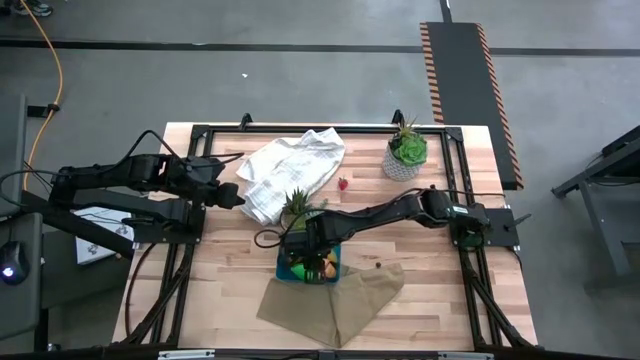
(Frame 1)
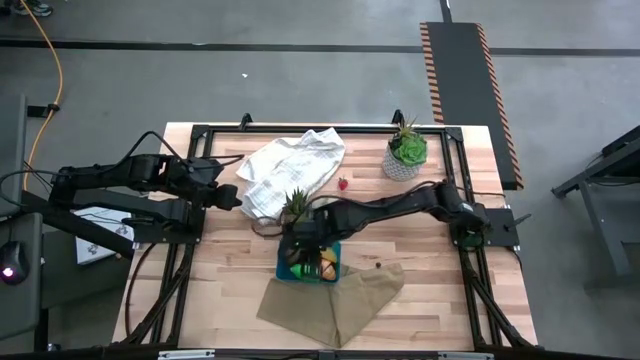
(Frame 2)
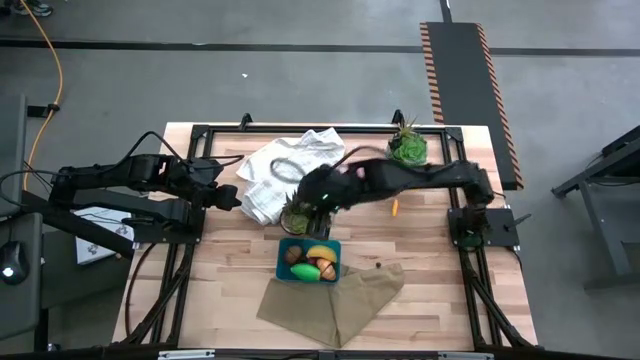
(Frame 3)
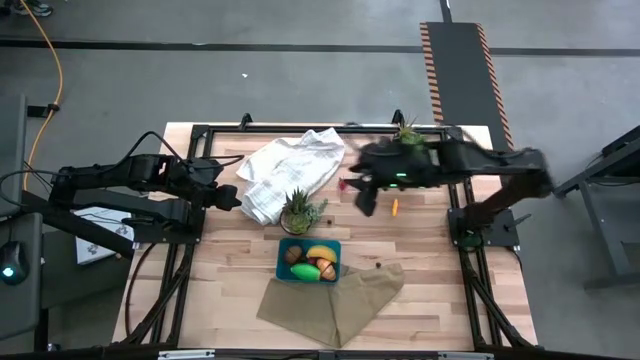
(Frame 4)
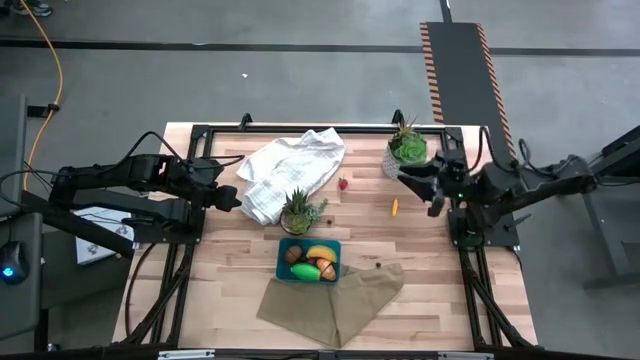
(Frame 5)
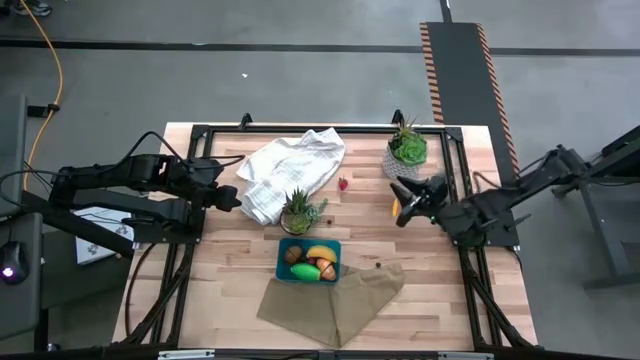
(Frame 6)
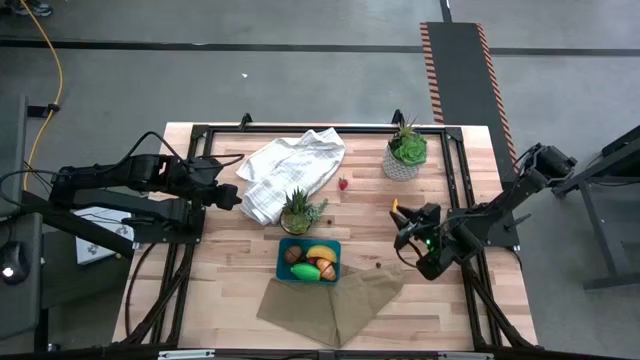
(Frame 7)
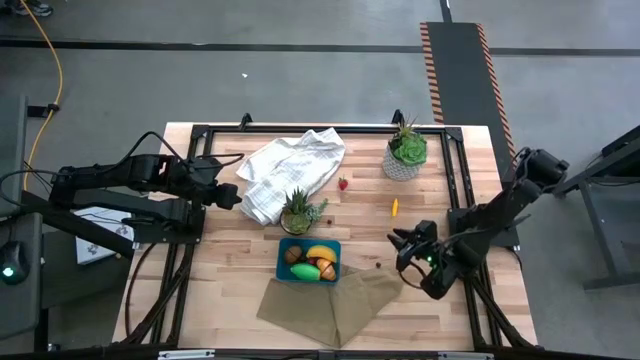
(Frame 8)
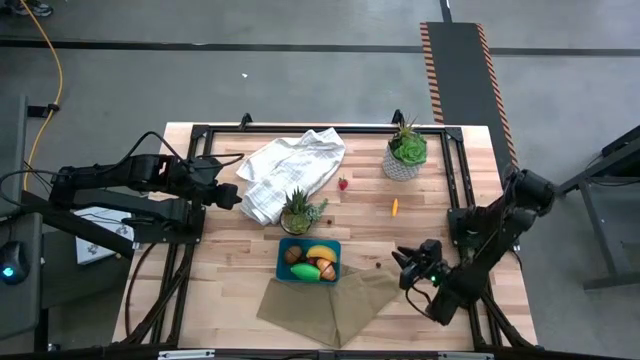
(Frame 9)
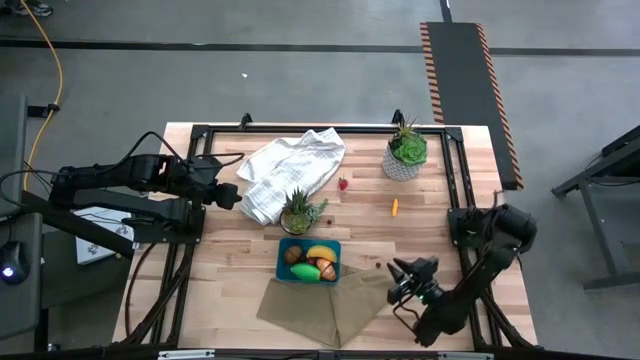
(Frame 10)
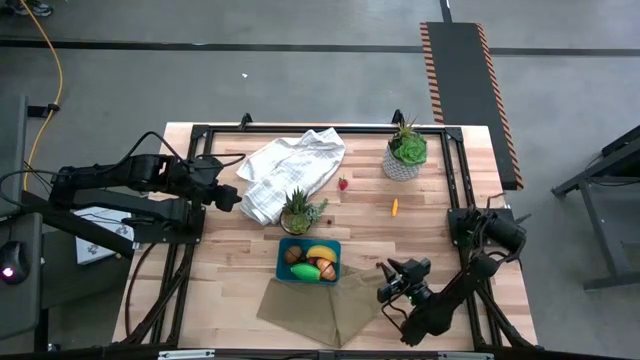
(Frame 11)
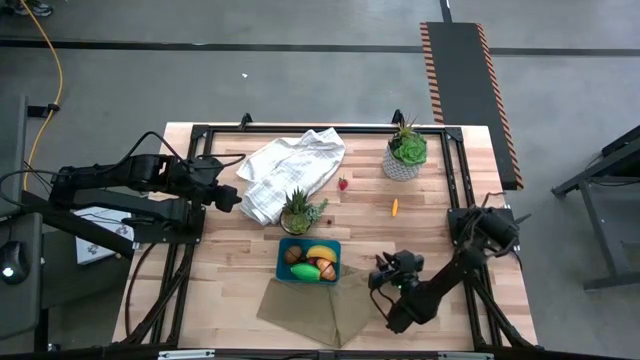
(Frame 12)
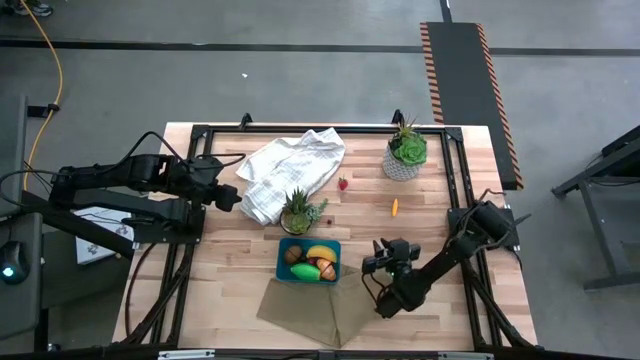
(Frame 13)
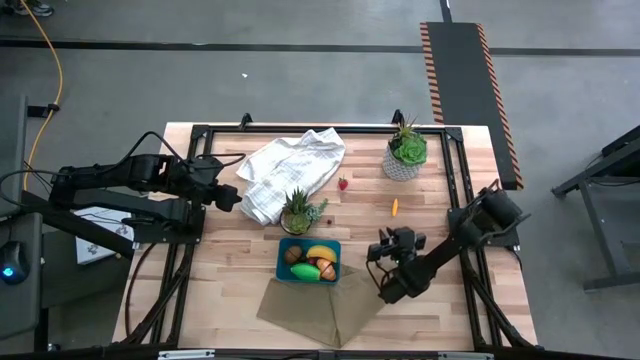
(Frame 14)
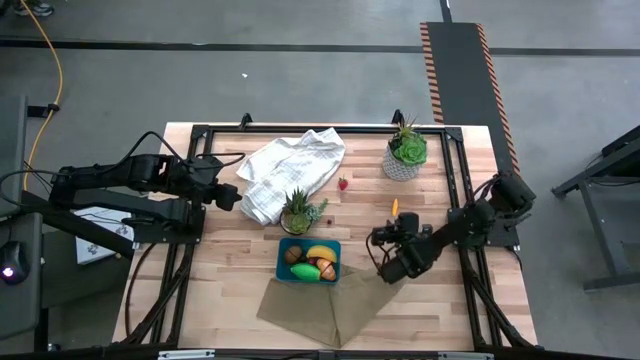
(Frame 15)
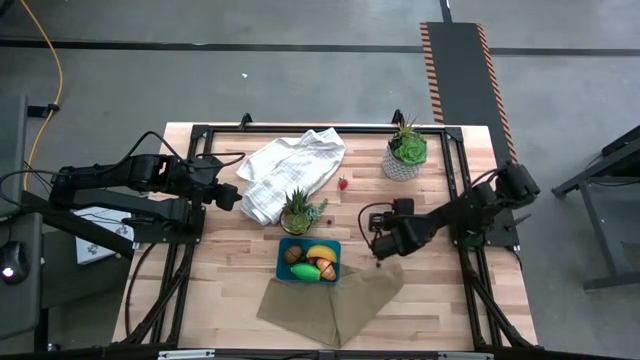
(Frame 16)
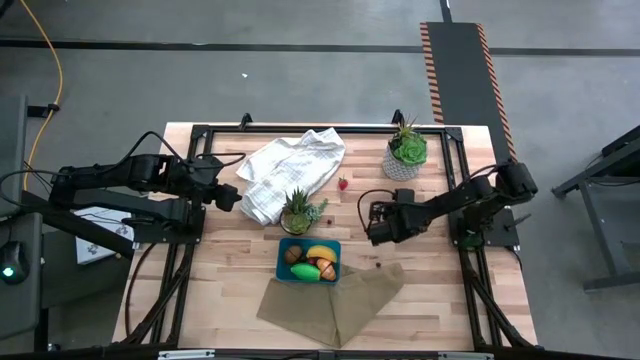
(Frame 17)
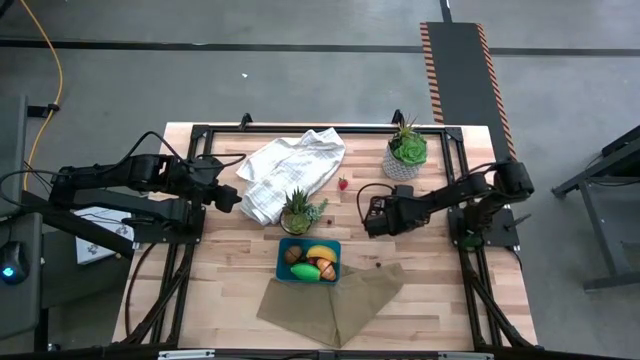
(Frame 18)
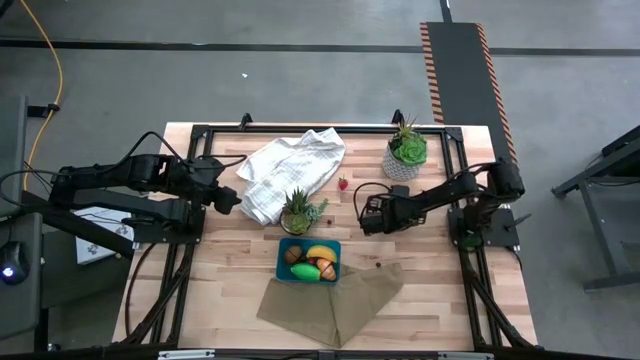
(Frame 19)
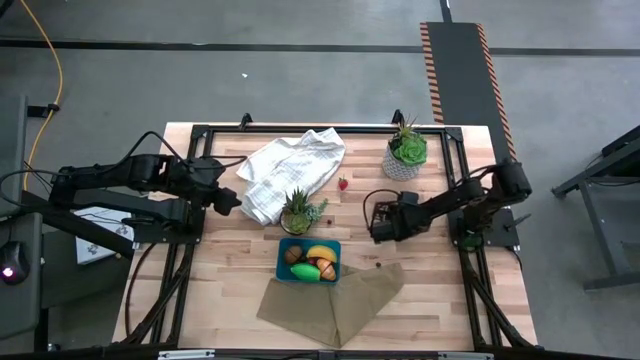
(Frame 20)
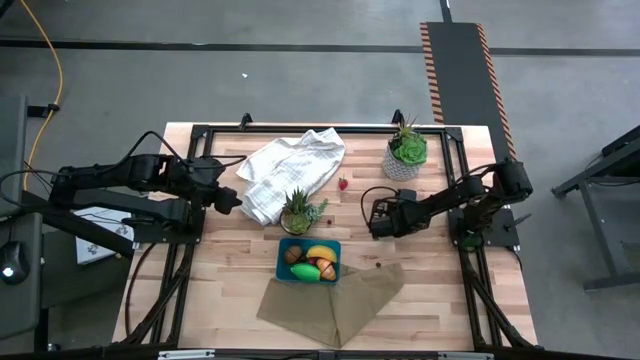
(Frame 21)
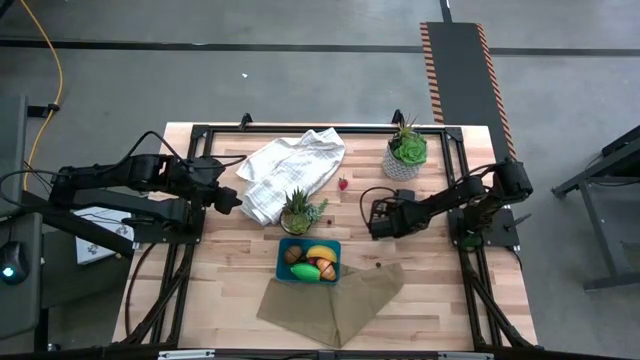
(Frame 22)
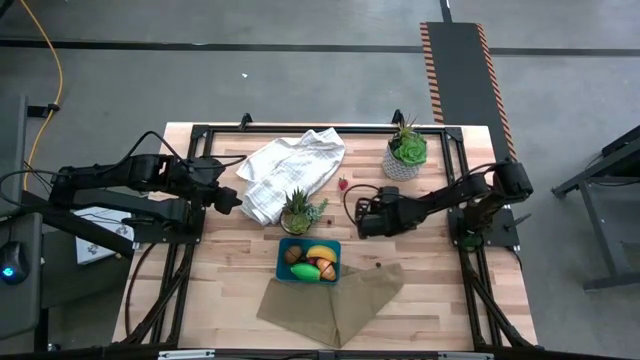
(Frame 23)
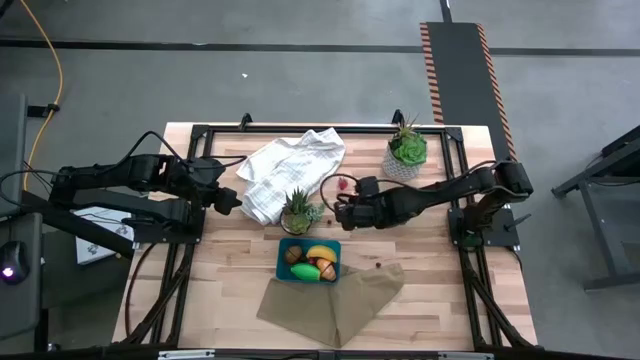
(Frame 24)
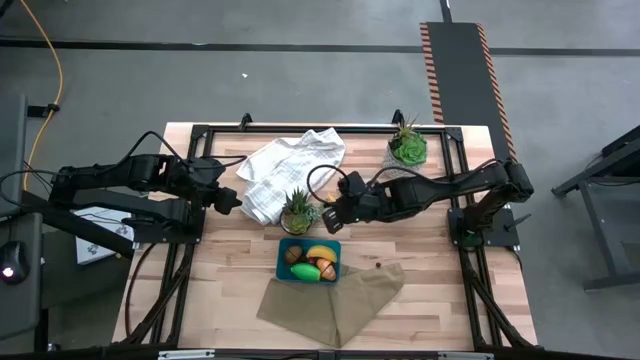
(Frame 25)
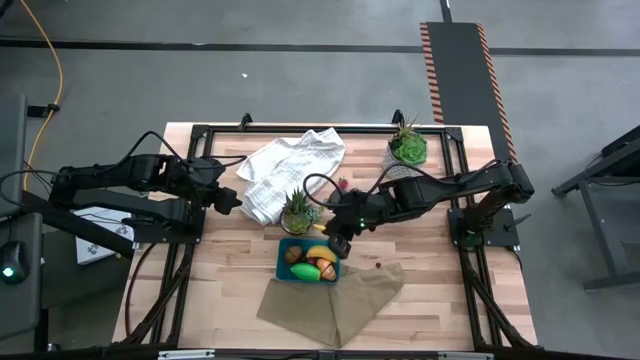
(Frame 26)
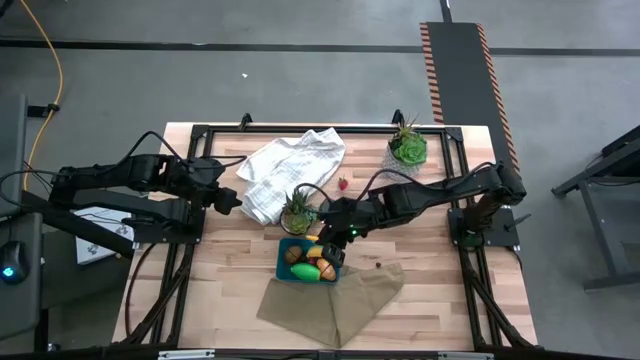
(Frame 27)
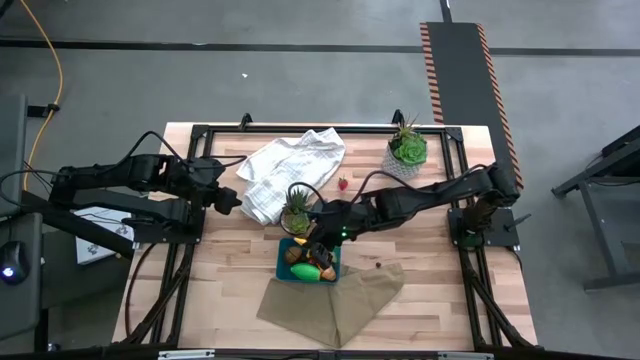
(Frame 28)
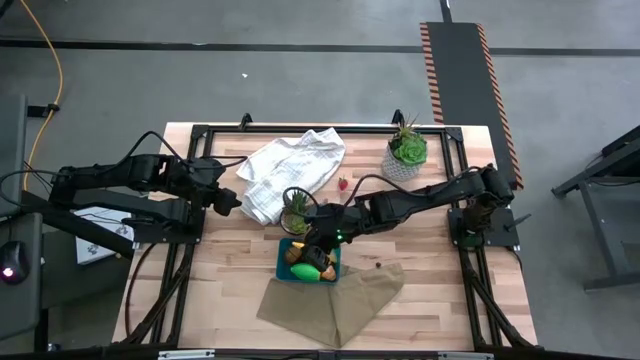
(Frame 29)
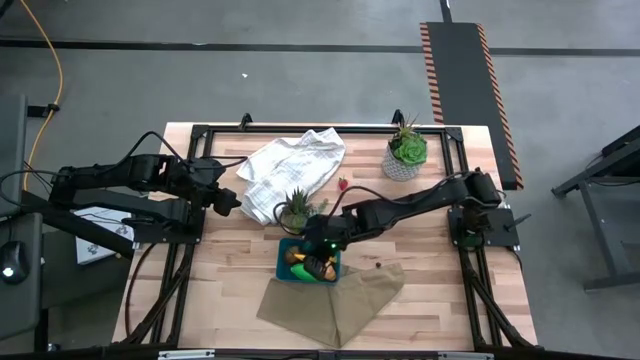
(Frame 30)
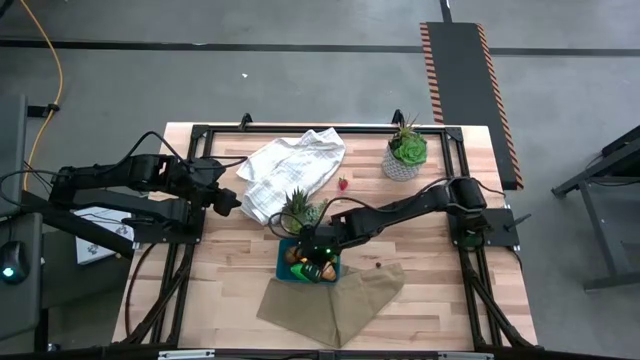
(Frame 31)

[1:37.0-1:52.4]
Task: Pick and placing Produce into tupperware
Put the small corn into the blue bin

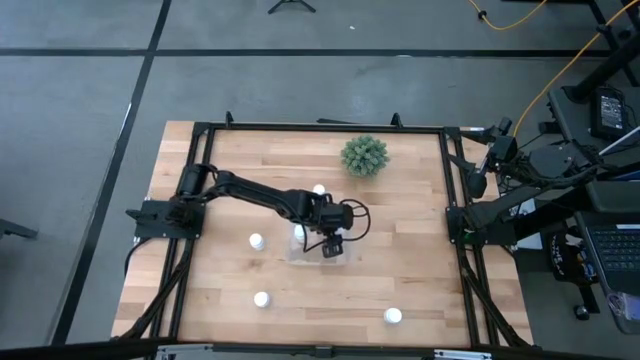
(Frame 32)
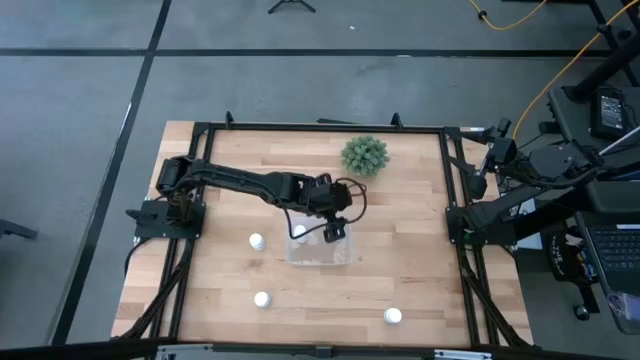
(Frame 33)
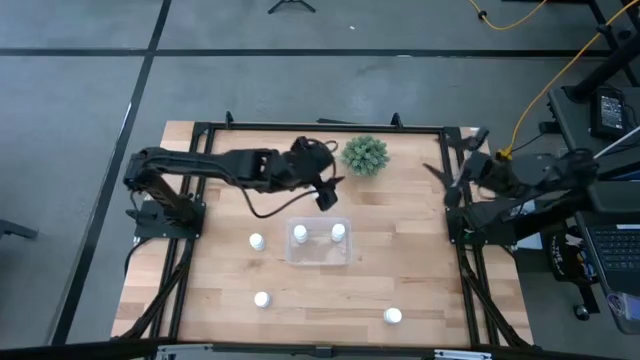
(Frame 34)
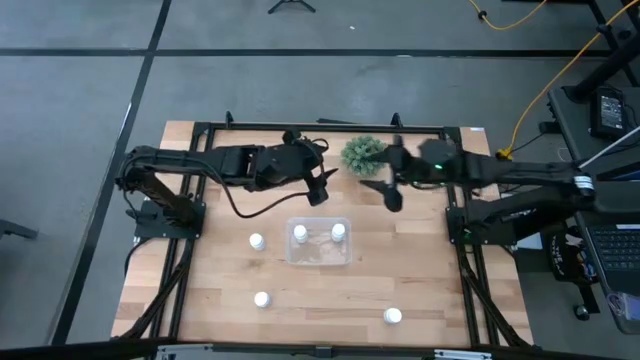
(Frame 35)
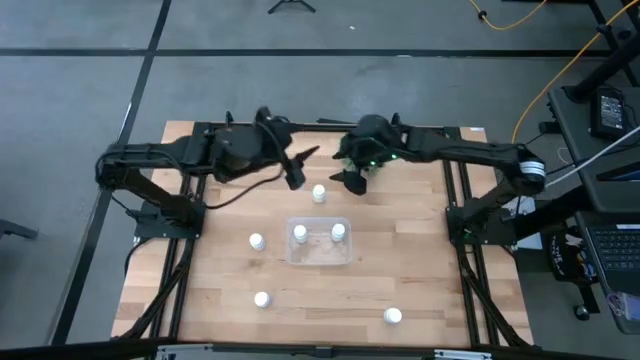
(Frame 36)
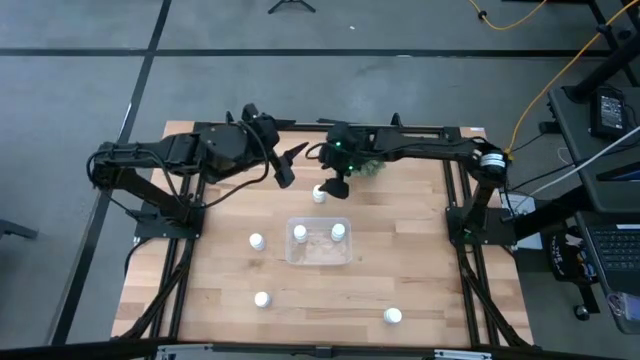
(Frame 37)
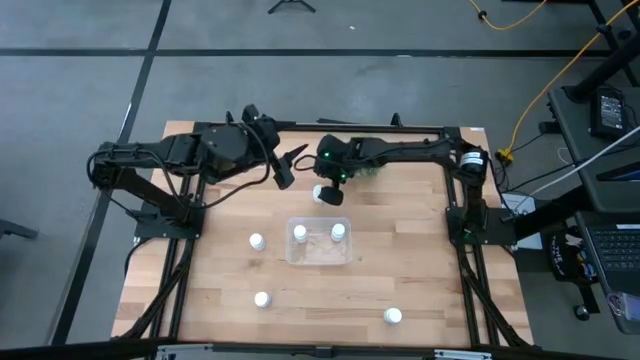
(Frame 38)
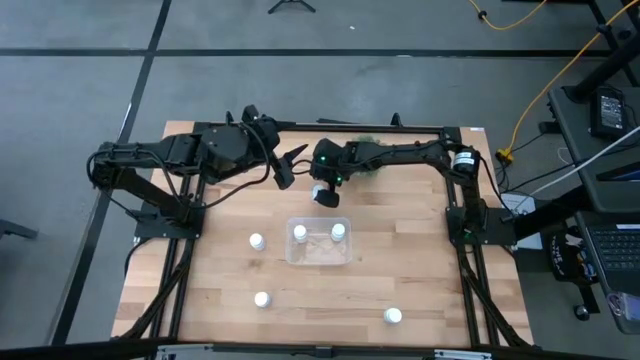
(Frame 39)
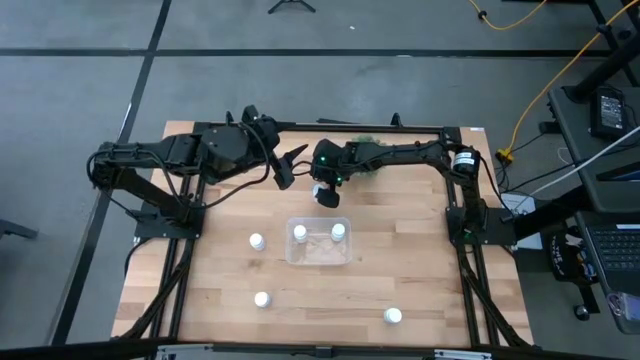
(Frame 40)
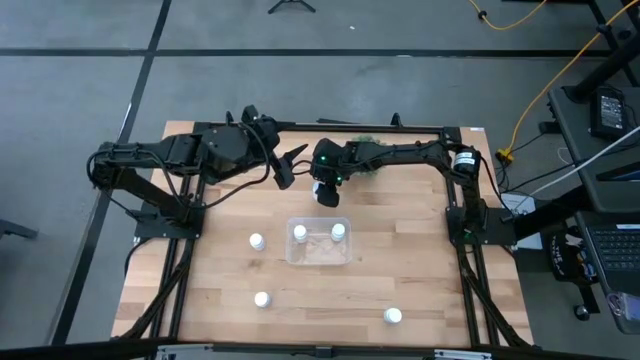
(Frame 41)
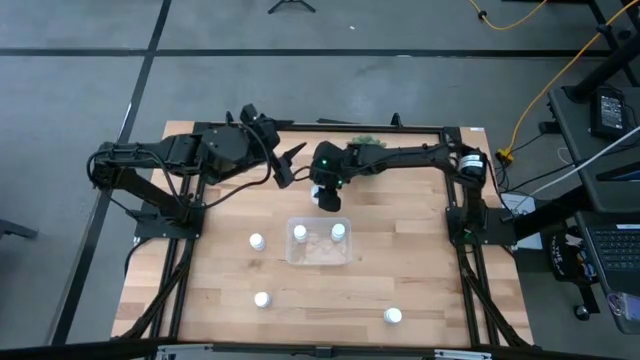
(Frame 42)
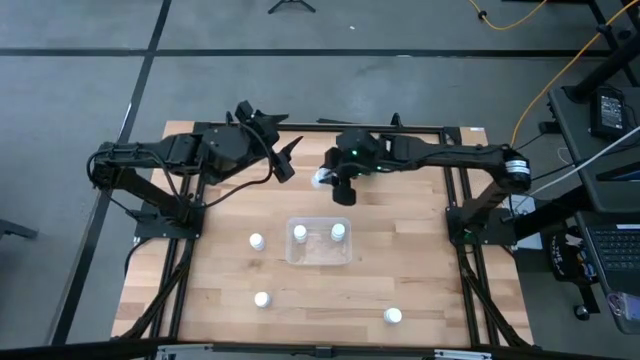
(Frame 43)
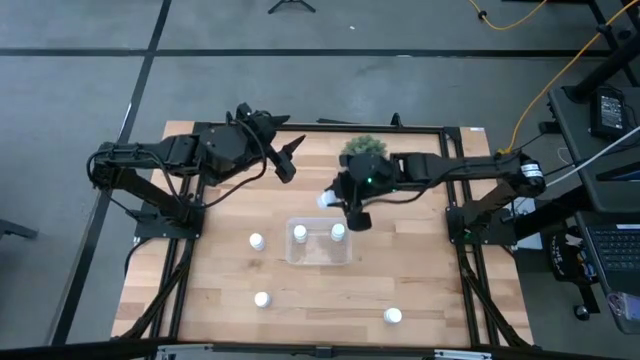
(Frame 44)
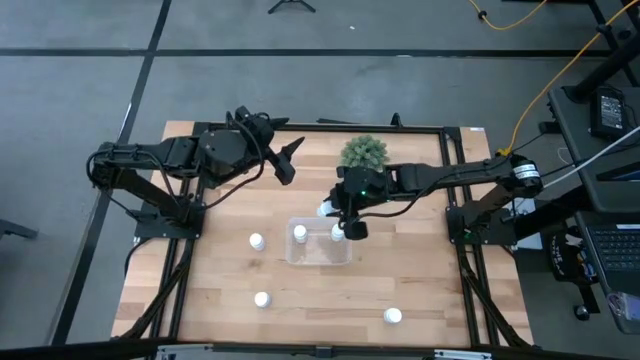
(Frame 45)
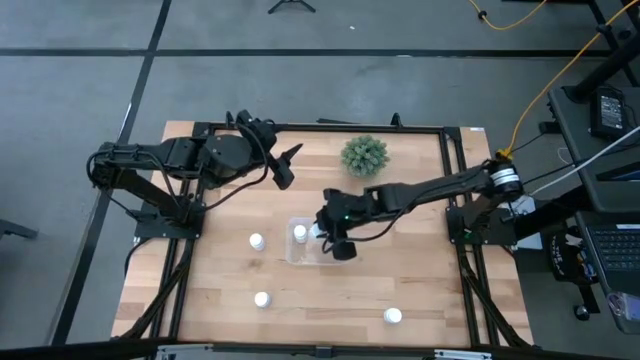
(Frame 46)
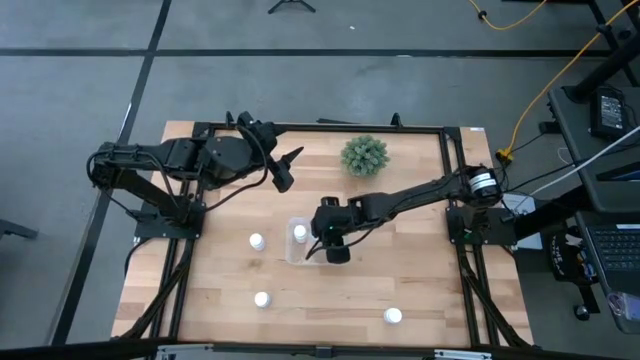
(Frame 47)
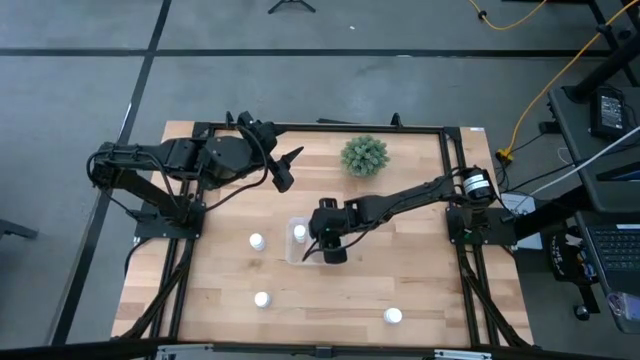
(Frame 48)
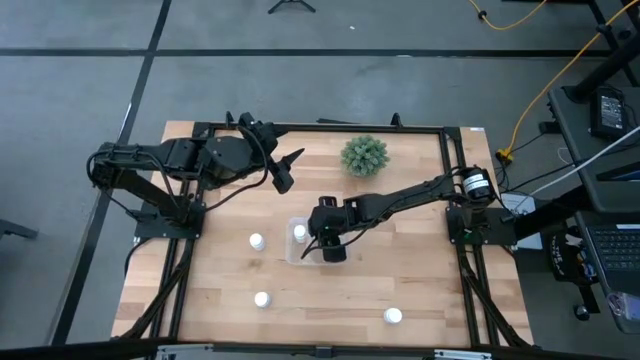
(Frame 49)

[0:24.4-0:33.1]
Task: Pick and place pill bottles into a basket
Put the white medicine bottle into the transparent bin
